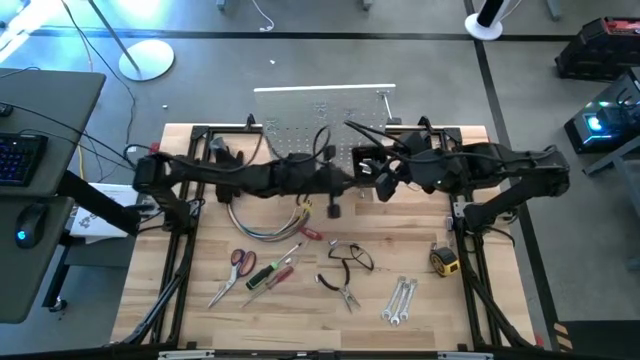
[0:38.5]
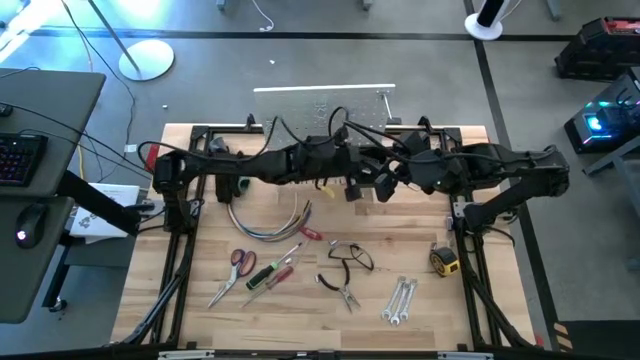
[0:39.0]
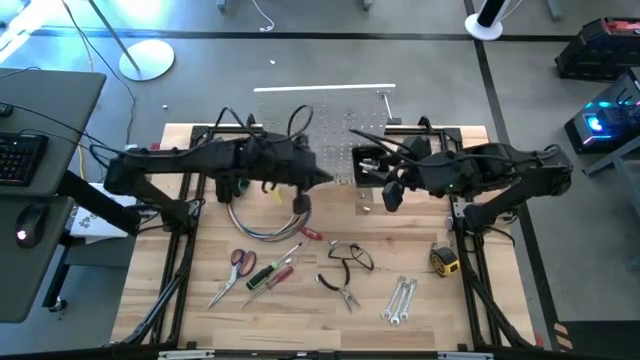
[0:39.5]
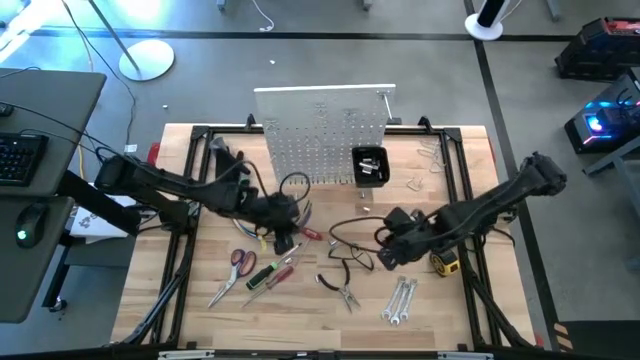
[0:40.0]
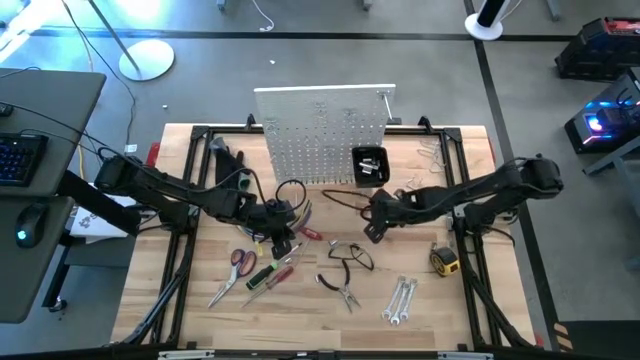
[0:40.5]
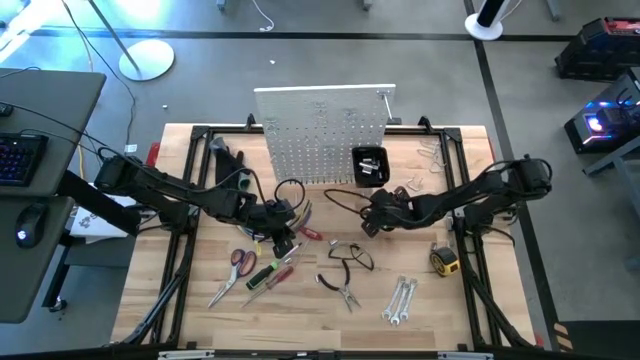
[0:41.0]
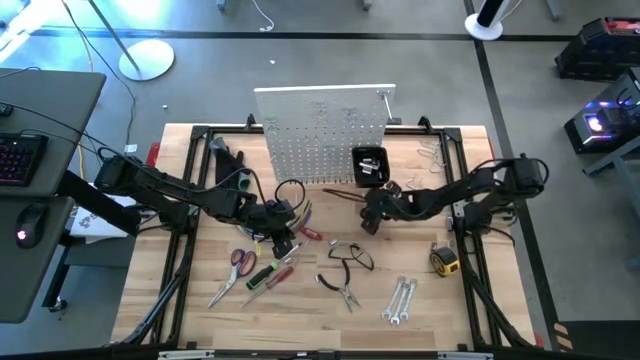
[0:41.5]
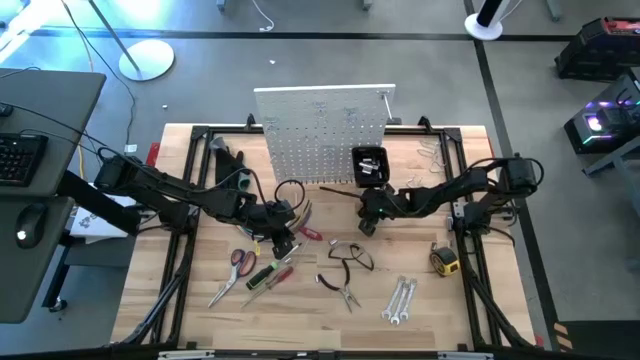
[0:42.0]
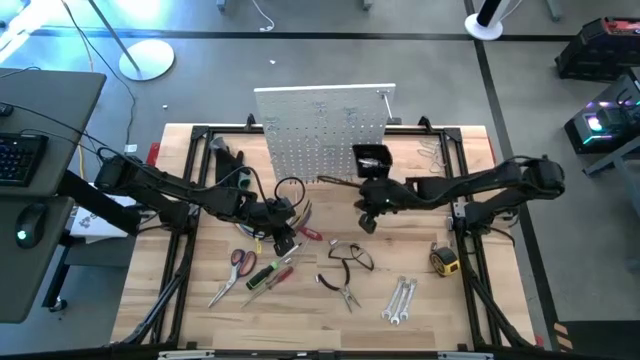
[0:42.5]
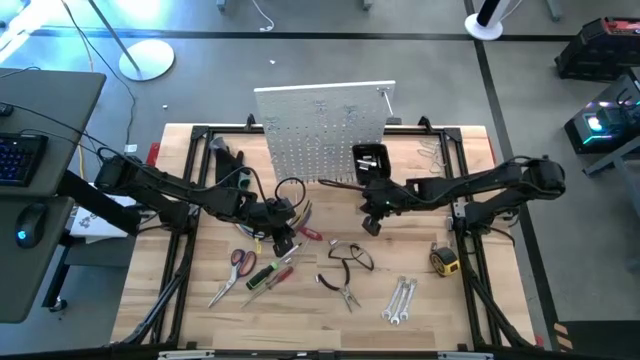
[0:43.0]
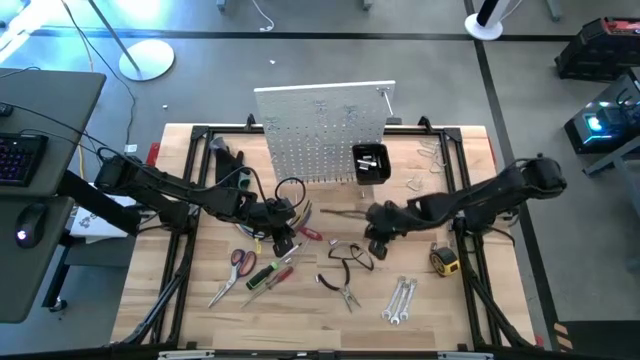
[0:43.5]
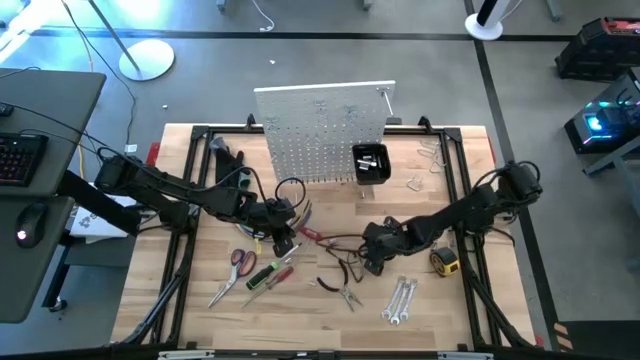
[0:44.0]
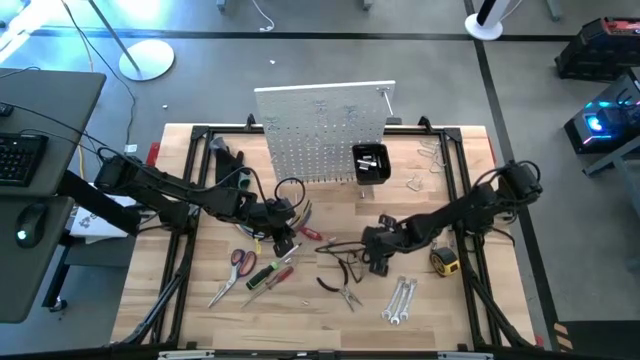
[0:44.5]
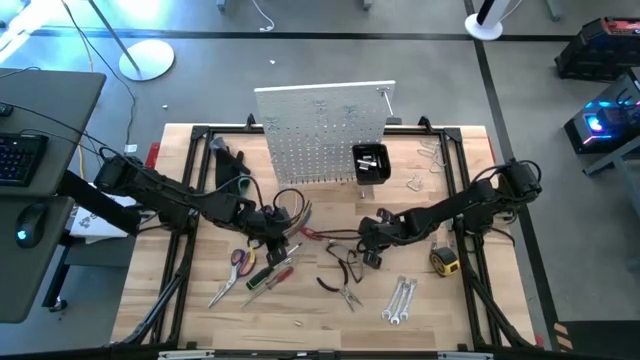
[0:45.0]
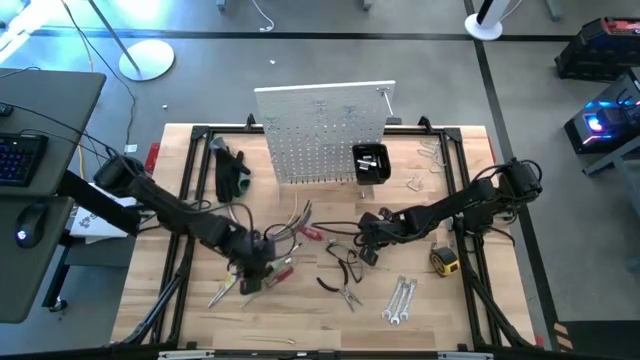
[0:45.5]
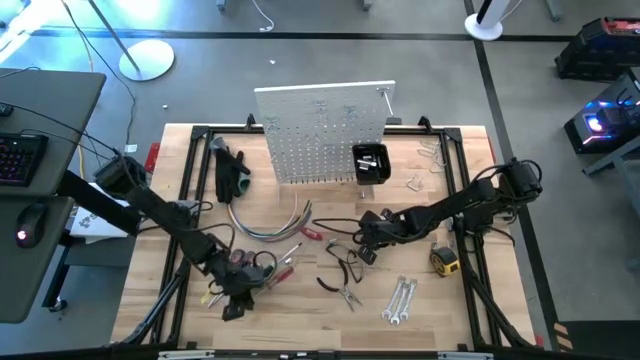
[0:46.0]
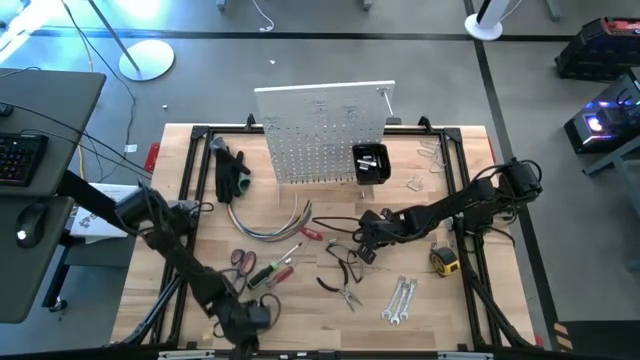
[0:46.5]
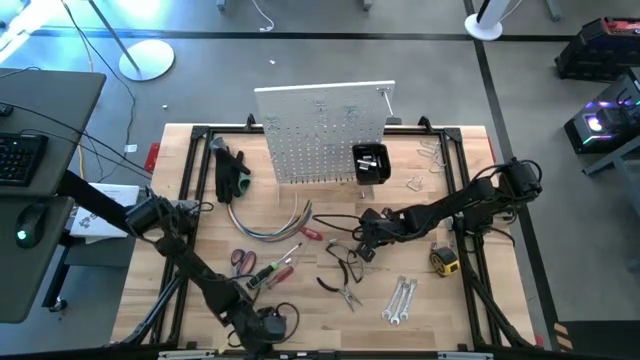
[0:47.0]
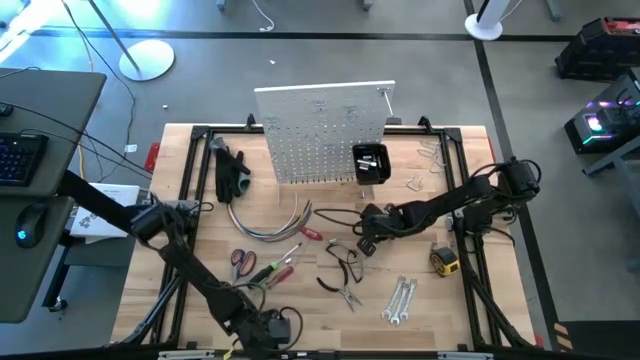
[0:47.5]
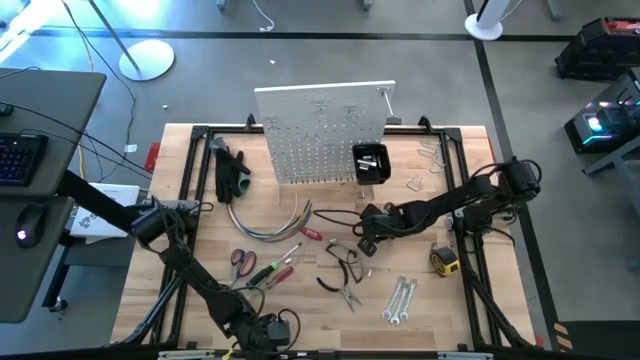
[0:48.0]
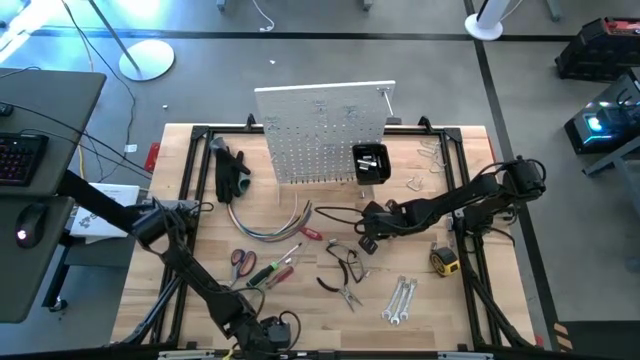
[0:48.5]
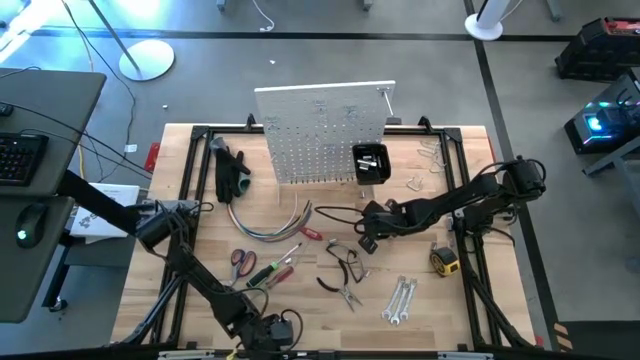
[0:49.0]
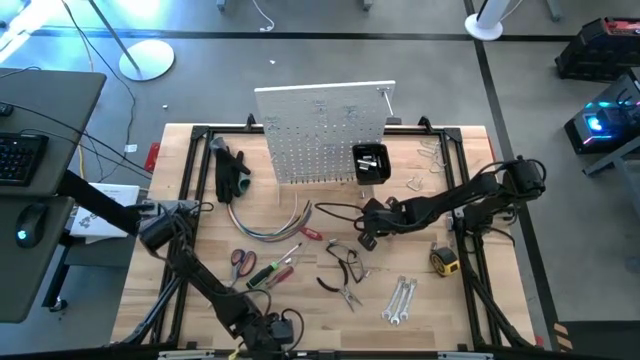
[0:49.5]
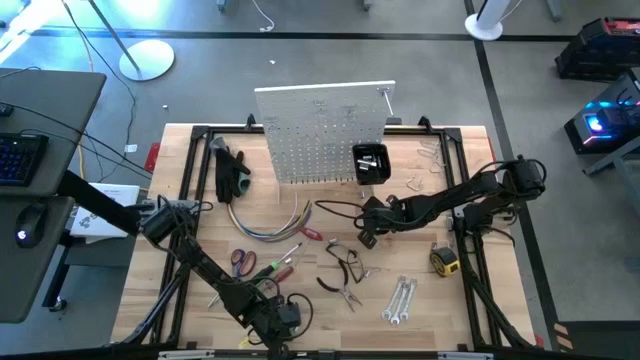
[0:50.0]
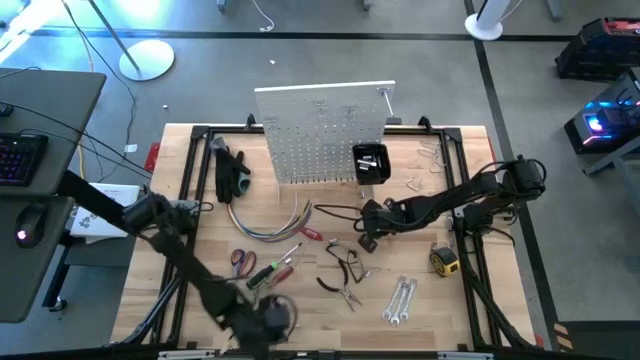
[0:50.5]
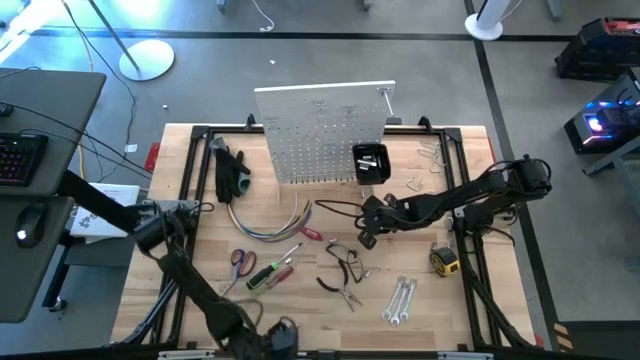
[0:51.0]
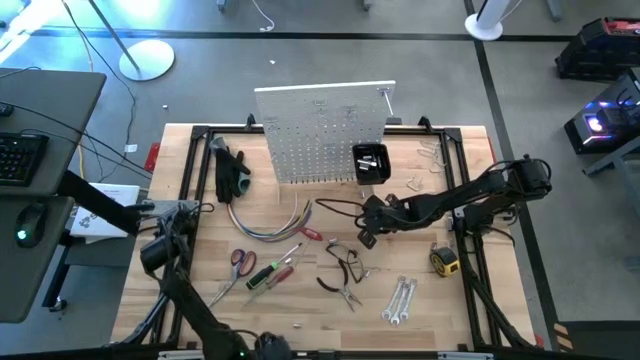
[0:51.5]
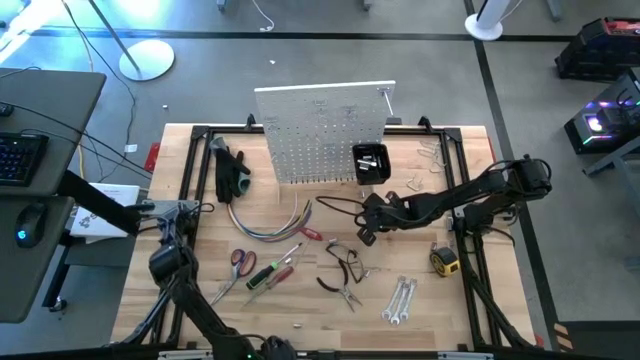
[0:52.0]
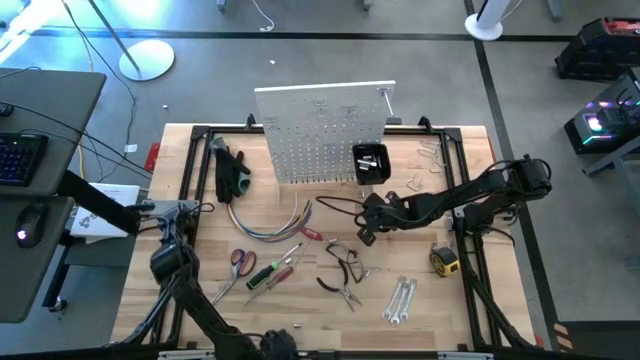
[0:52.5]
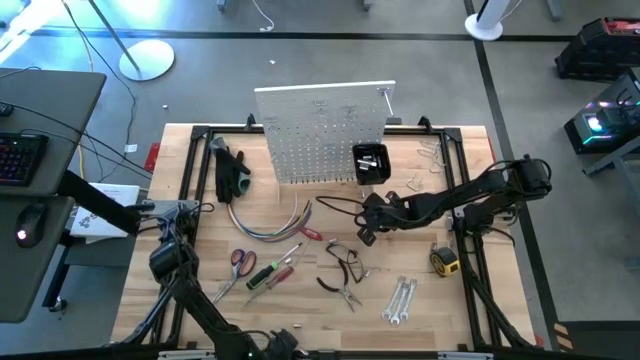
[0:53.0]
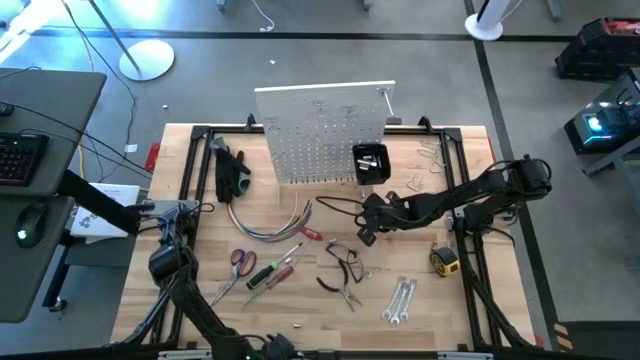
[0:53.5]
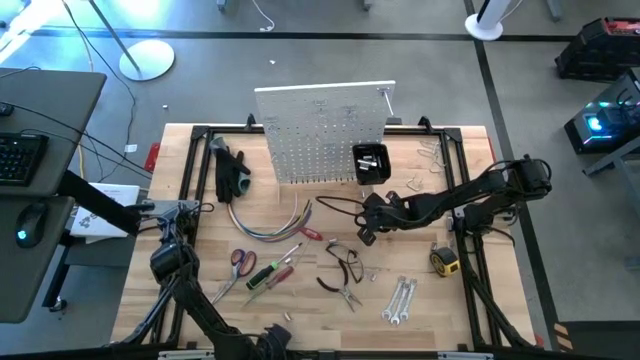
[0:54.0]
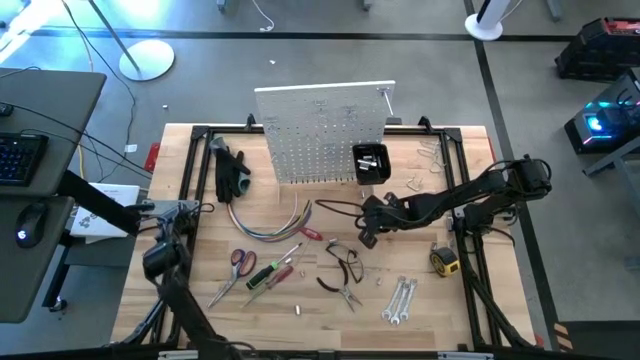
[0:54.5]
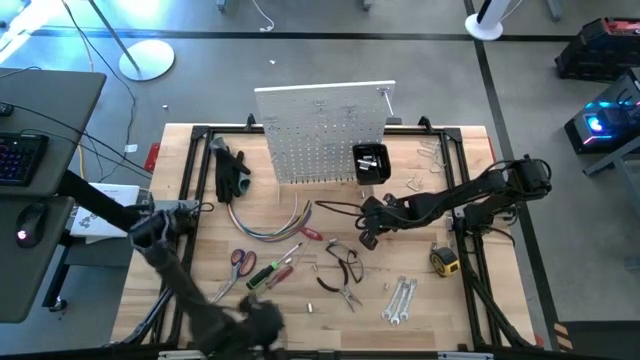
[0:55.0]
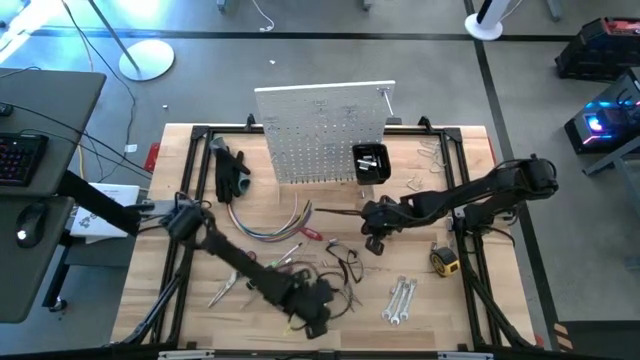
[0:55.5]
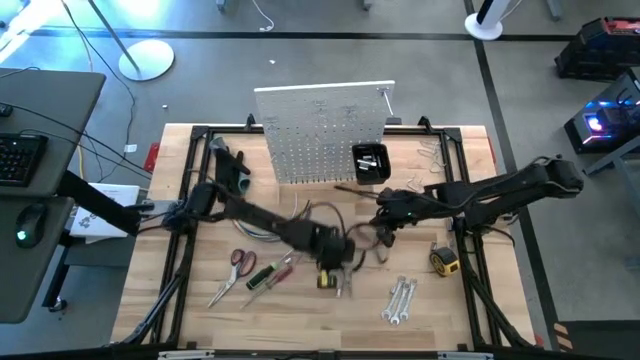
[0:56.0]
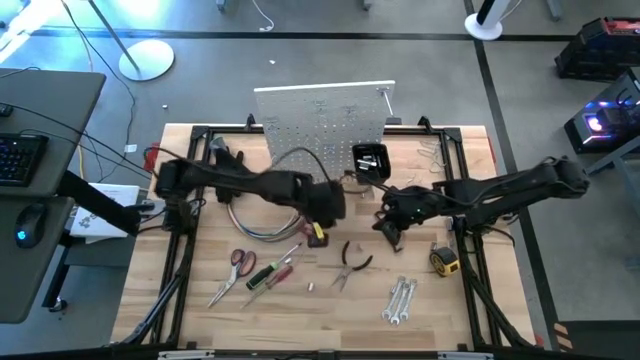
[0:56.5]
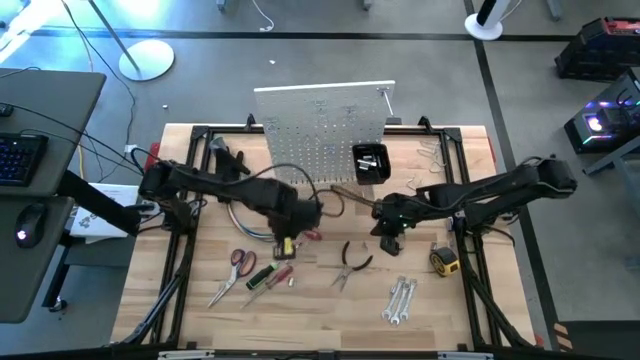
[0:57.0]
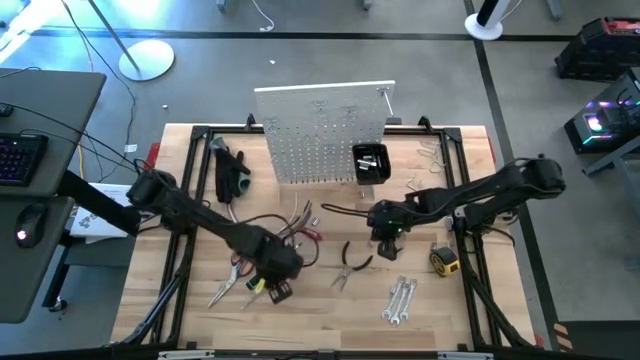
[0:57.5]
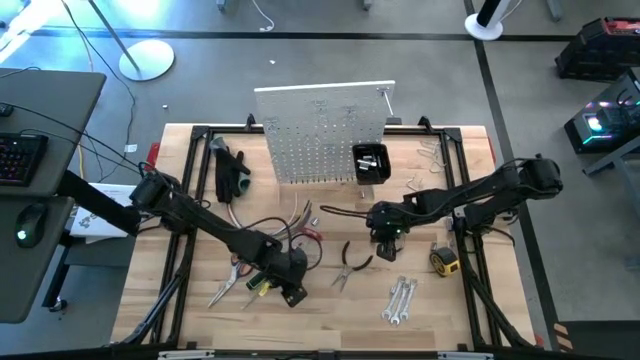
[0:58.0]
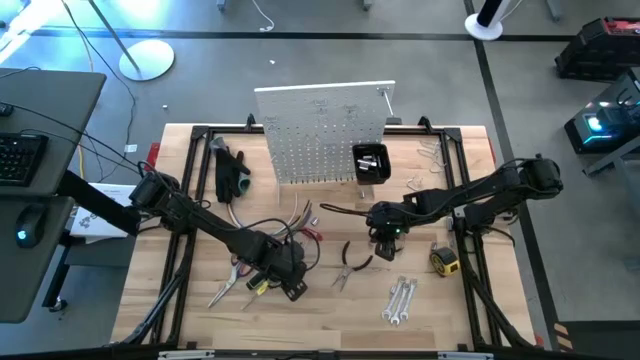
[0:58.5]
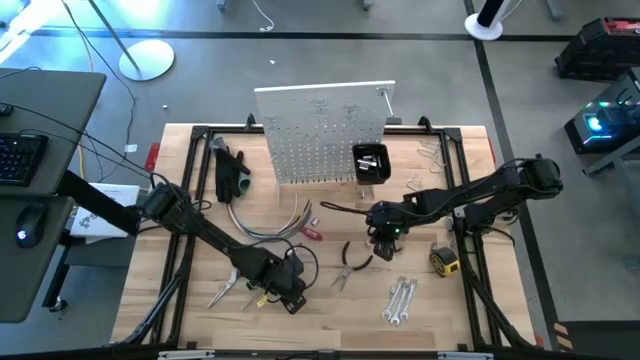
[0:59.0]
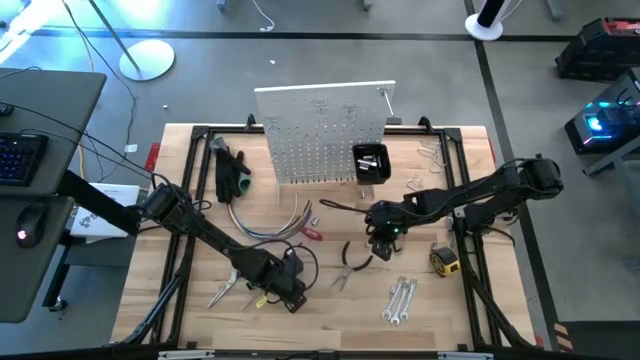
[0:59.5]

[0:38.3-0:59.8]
Task: Hang tools onto peg board
Put the socket into the black bin on the peg board
